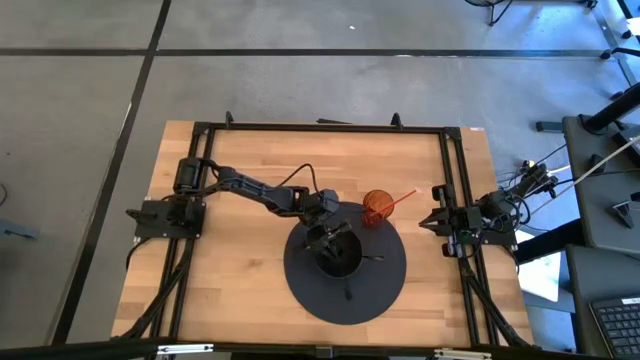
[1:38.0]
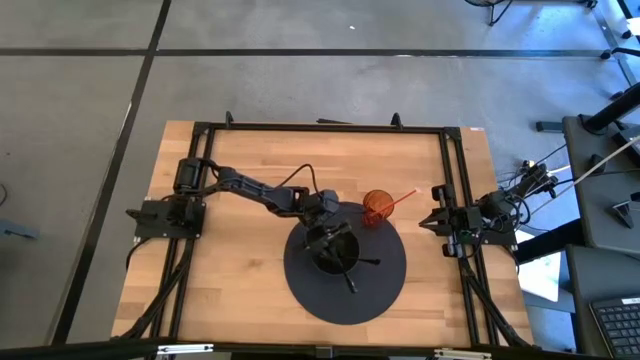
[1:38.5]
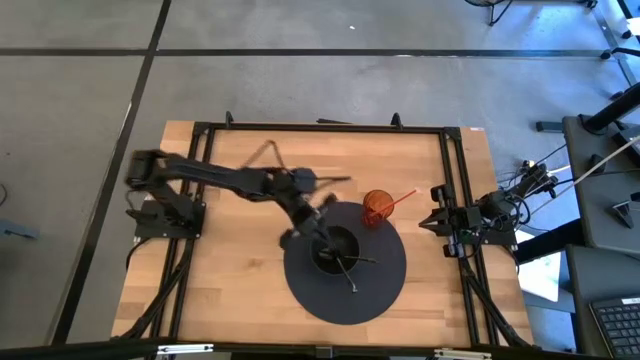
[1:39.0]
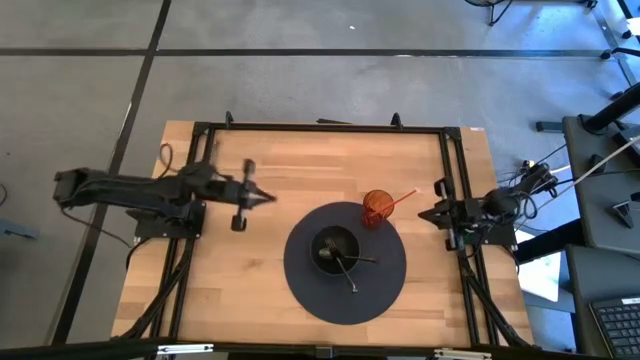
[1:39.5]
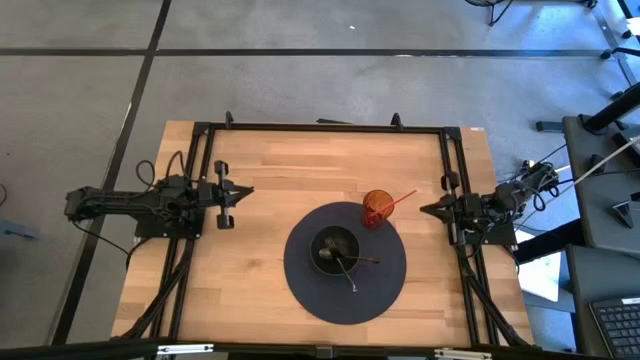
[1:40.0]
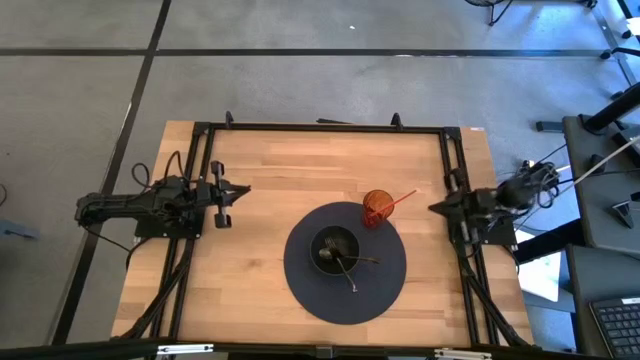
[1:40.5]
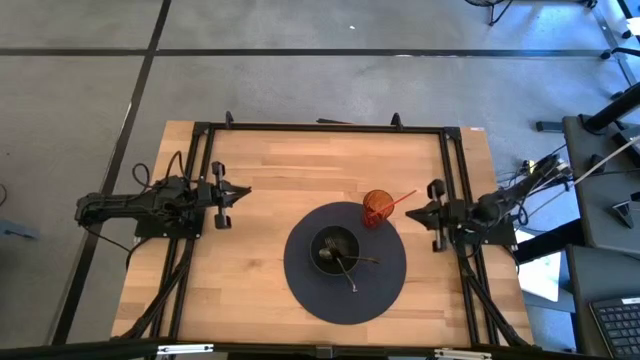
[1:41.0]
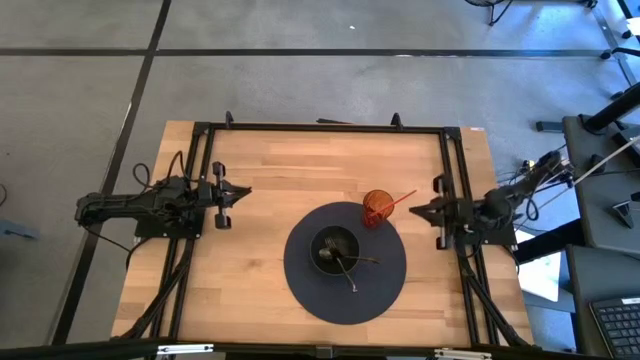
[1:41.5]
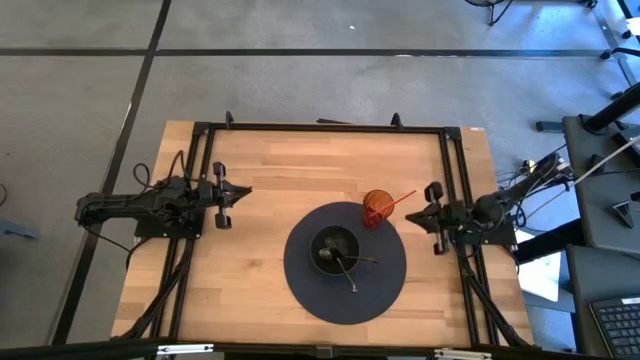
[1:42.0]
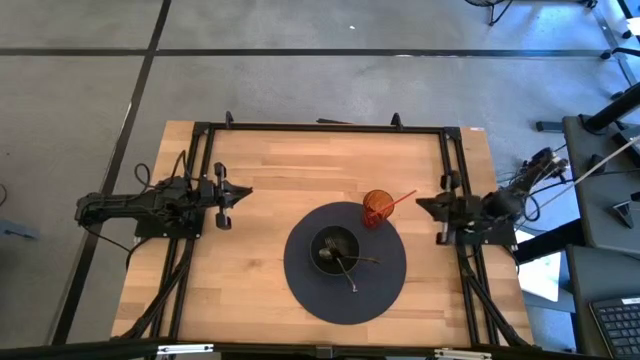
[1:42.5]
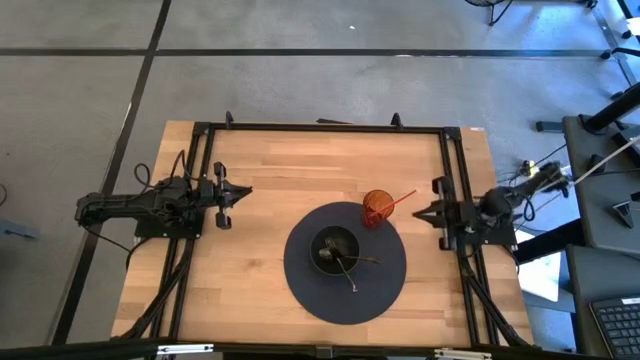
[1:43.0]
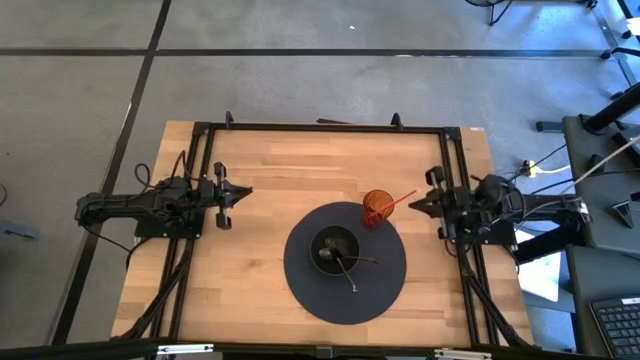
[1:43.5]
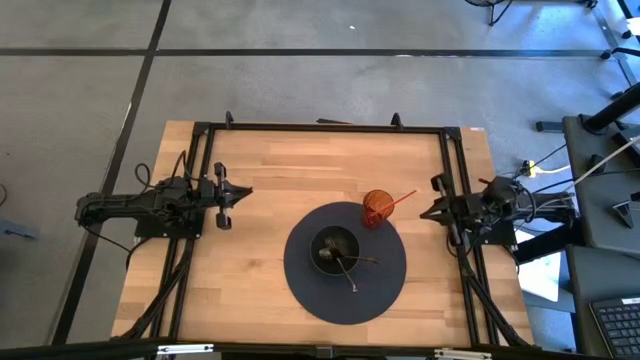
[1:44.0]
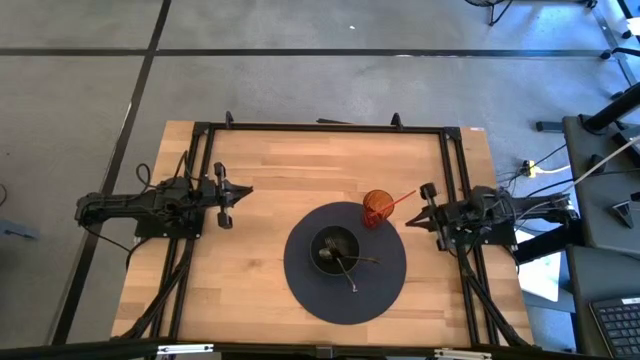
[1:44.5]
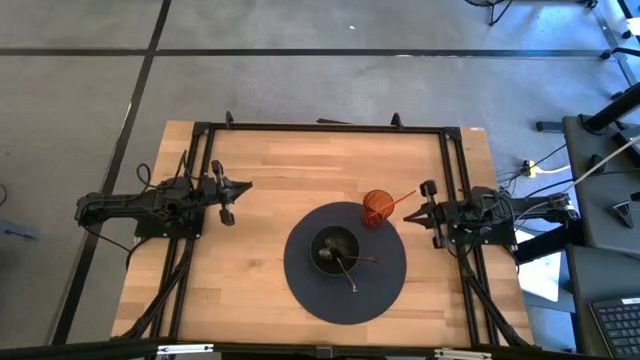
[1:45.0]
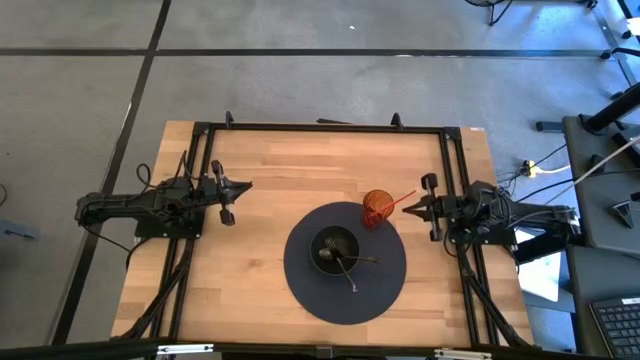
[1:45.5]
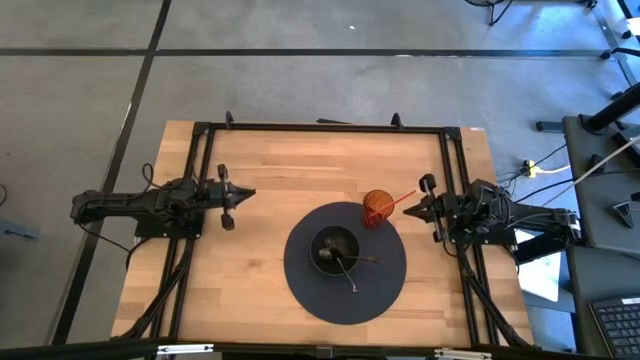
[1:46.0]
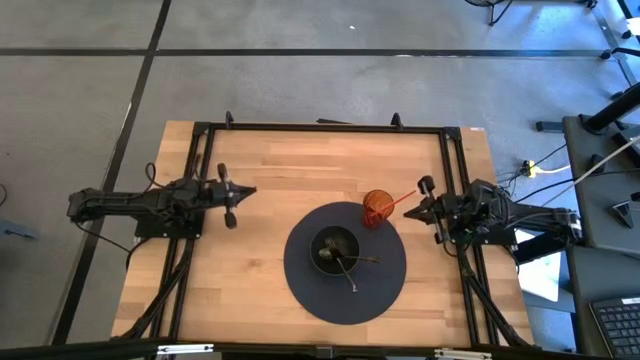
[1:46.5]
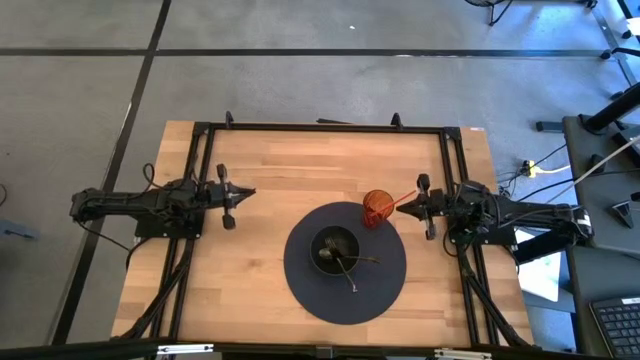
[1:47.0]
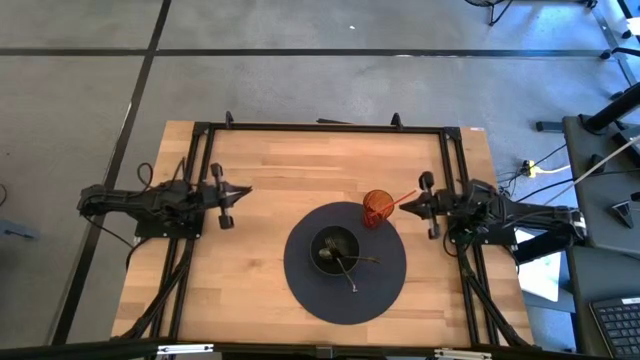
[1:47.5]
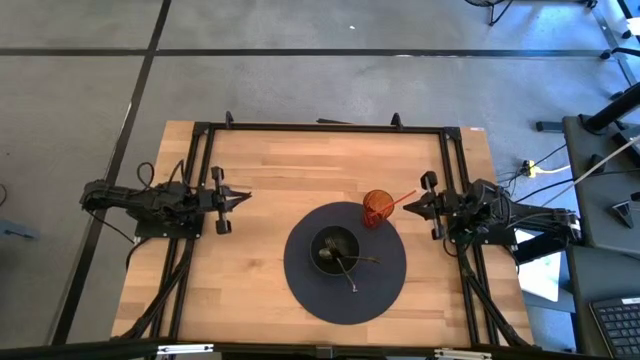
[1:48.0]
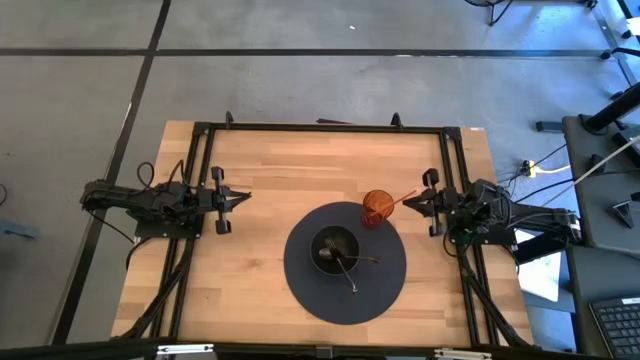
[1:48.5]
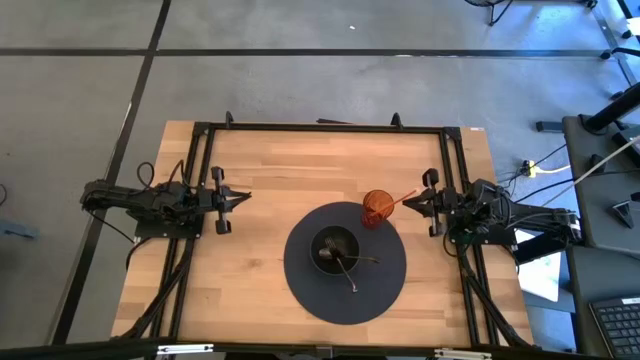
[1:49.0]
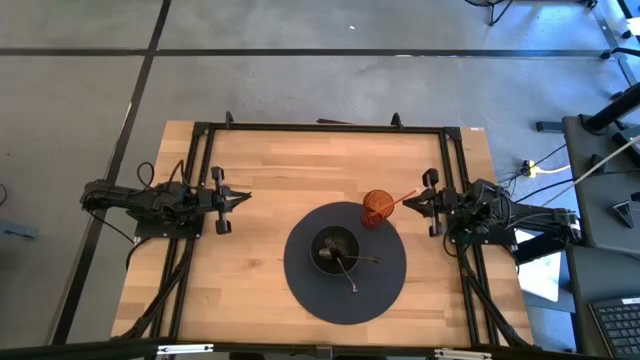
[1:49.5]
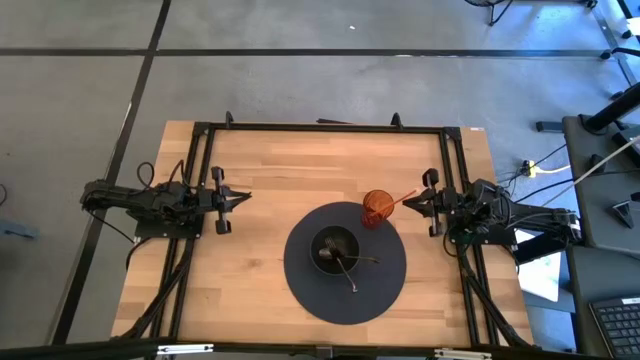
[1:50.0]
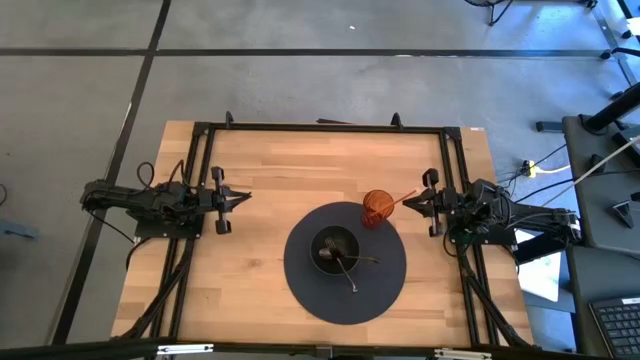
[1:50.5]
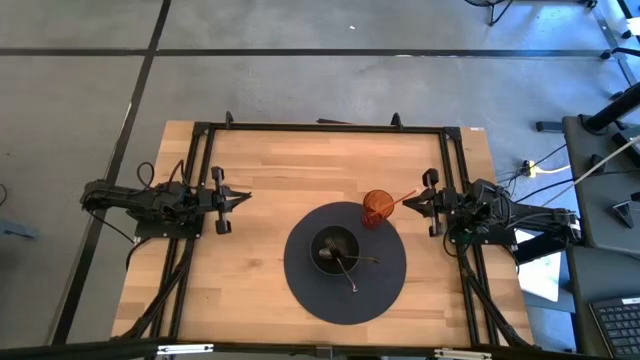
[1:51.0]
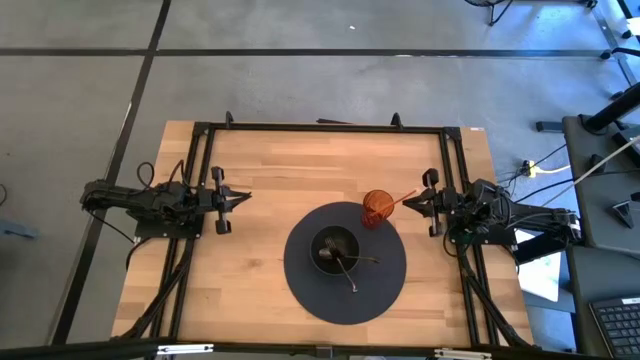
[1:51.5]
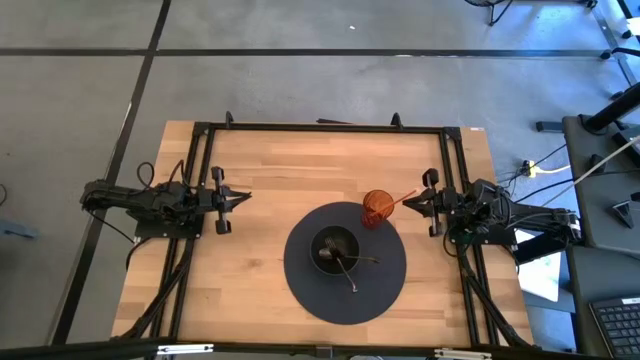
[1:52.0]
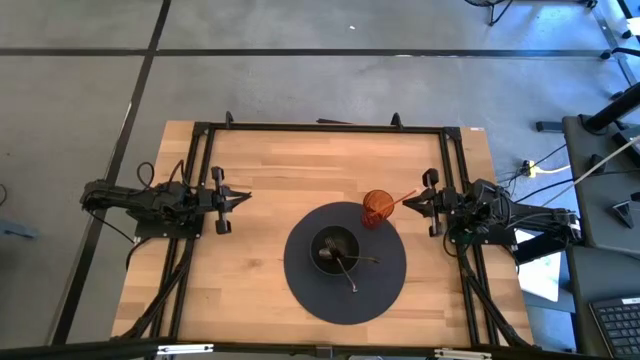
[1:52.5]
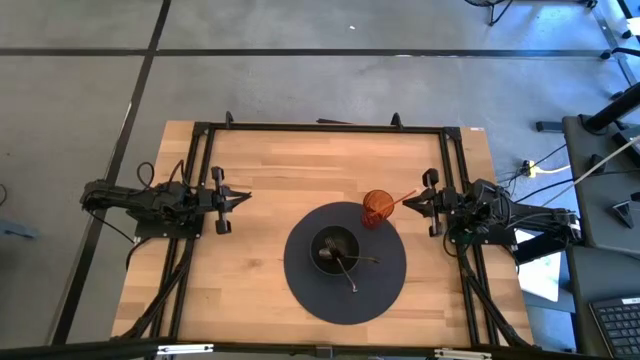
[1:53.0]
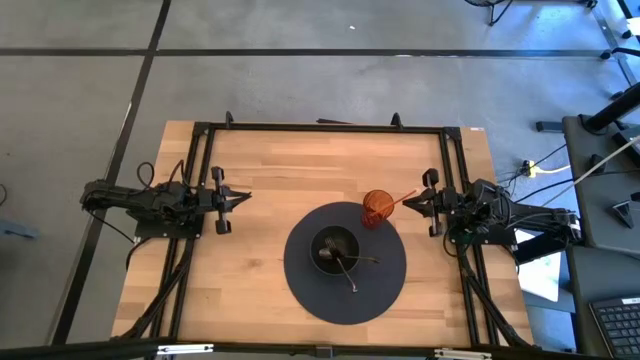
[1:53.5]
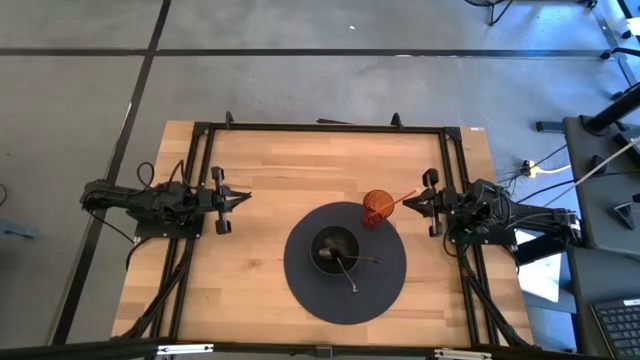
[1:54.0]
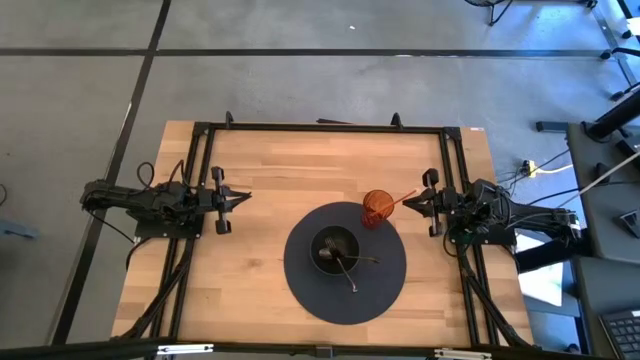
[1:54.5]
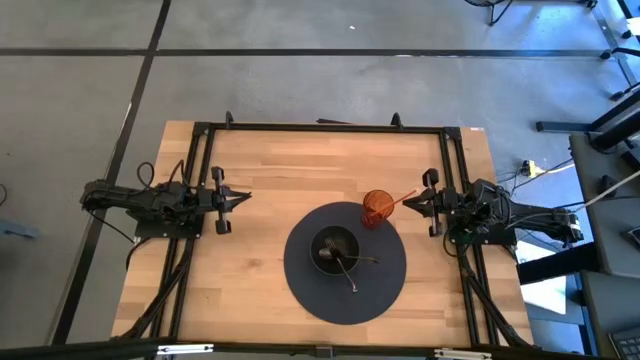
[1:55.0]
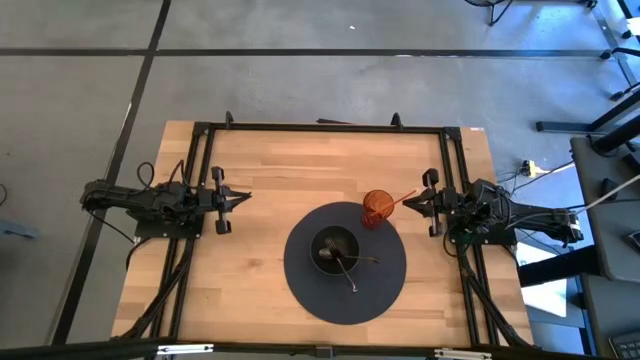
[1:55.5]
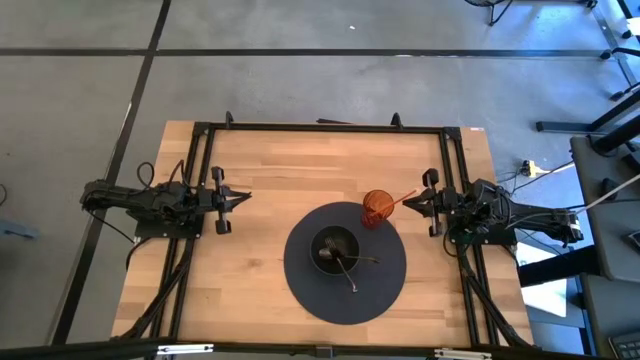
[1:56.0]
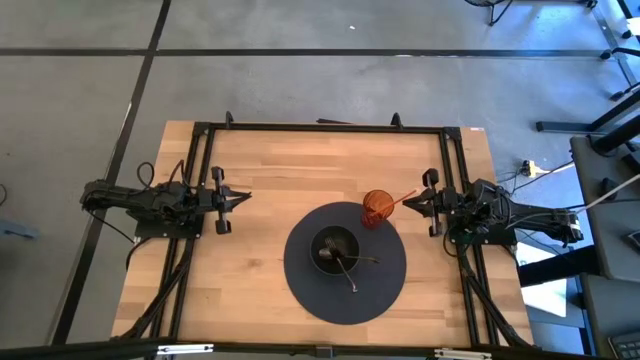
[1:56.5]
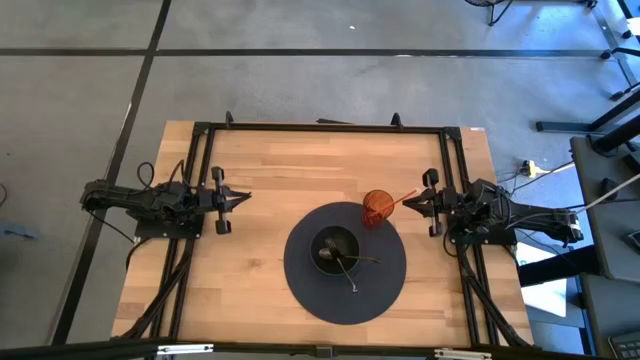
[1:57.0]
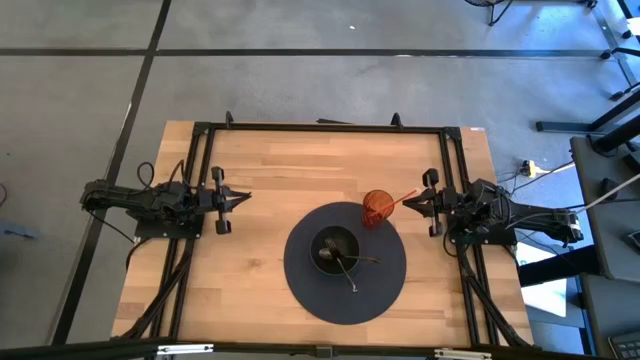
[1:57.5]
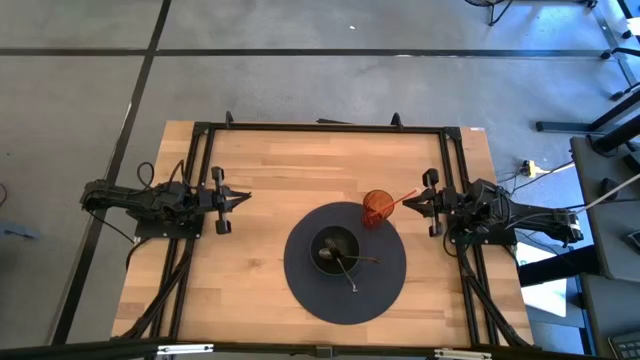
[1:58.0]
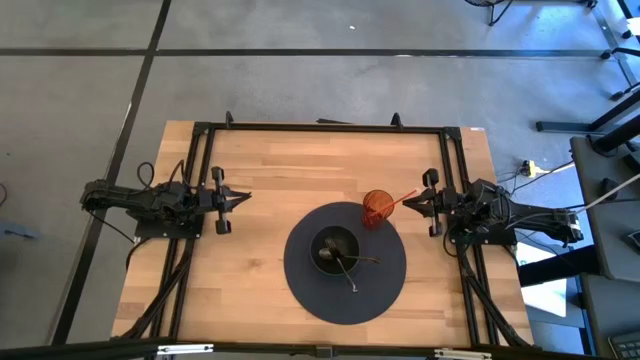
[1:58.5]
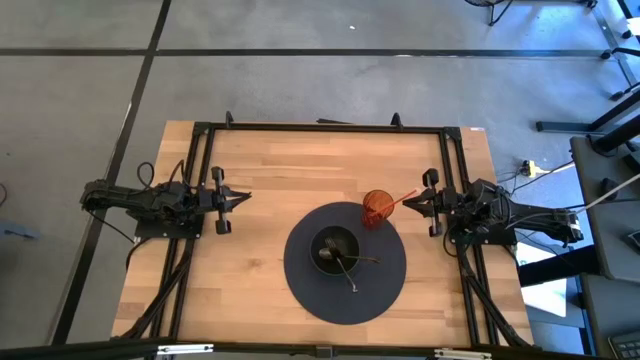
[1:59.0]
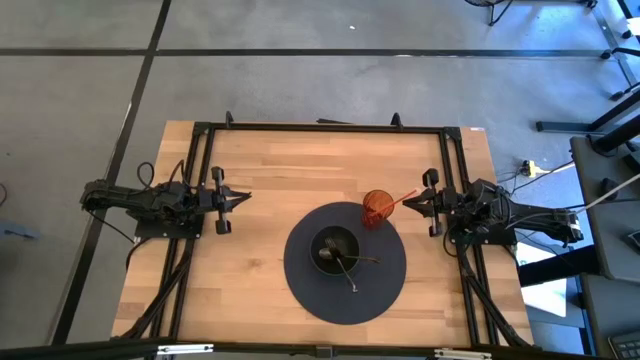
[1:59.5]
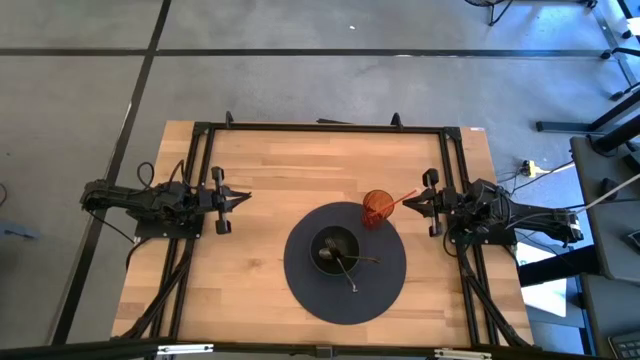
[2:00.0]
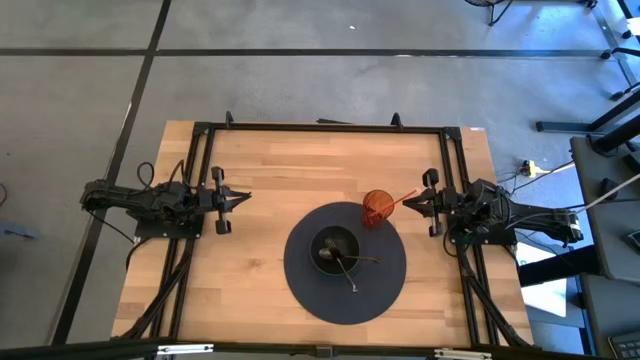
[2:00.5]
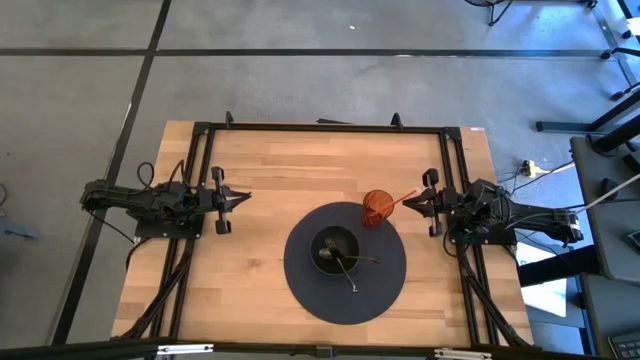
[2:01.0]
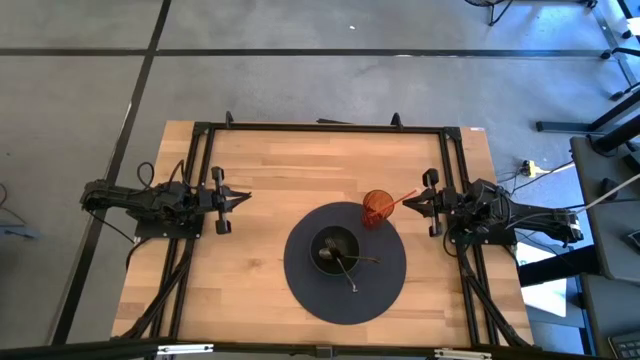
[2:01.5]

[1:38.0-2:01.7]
Task: Pick & Place Utensil
Return to Home Position
